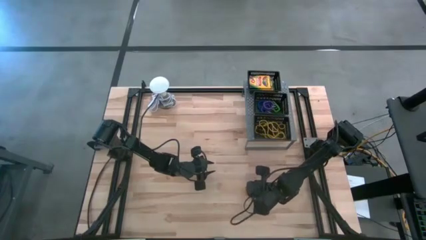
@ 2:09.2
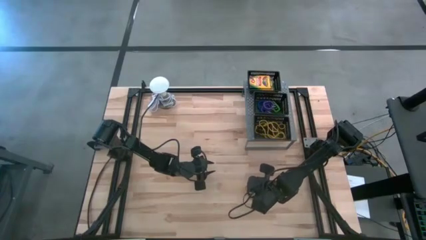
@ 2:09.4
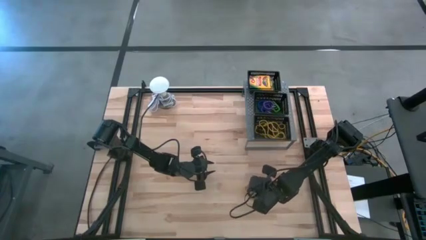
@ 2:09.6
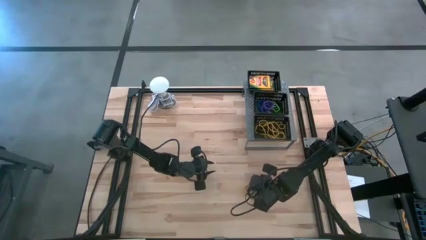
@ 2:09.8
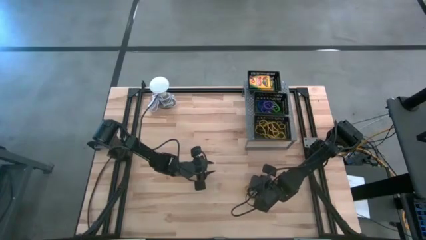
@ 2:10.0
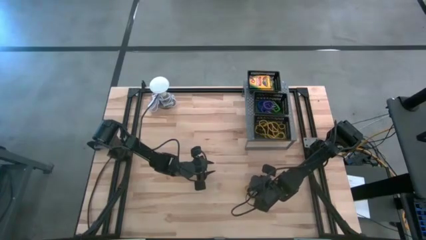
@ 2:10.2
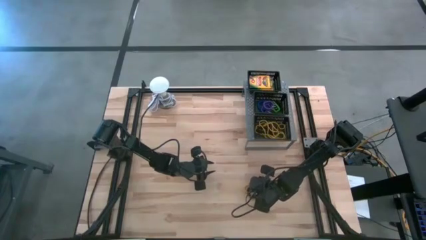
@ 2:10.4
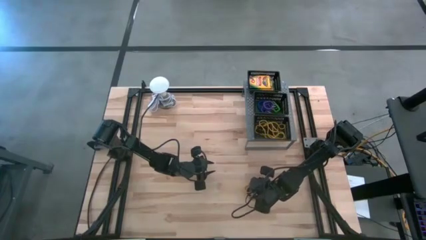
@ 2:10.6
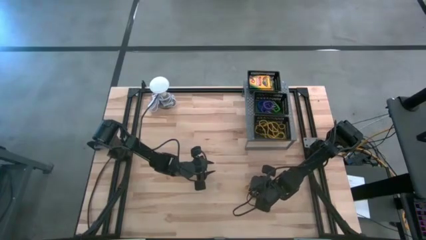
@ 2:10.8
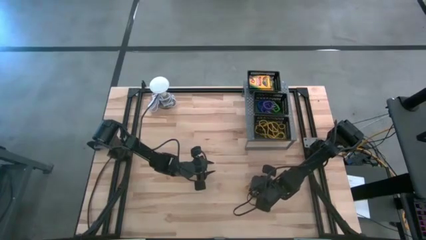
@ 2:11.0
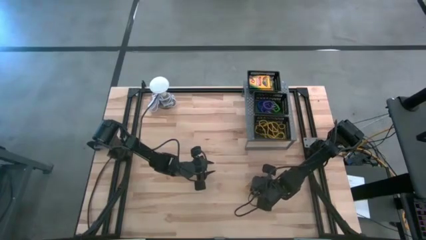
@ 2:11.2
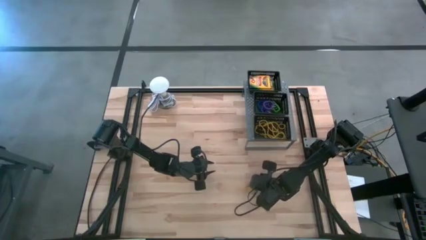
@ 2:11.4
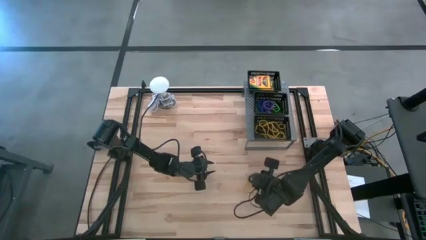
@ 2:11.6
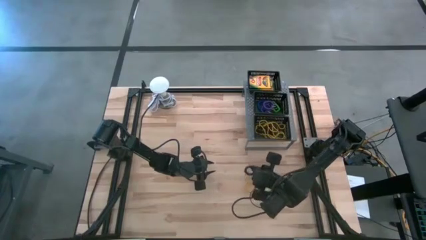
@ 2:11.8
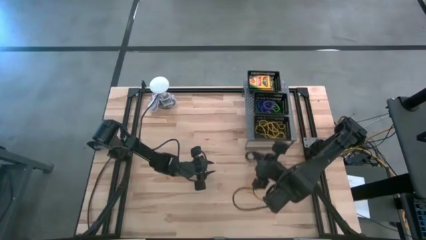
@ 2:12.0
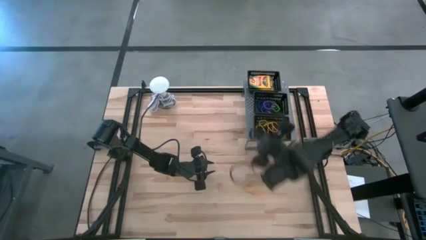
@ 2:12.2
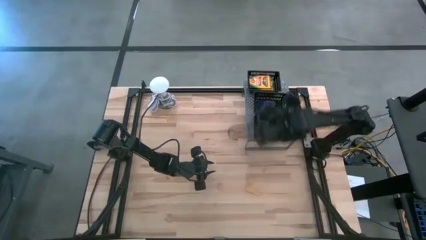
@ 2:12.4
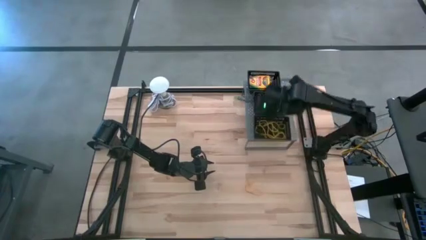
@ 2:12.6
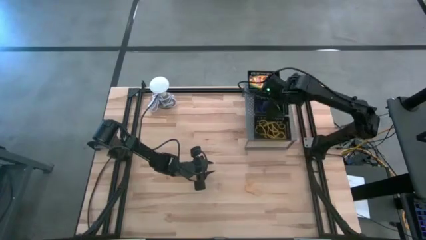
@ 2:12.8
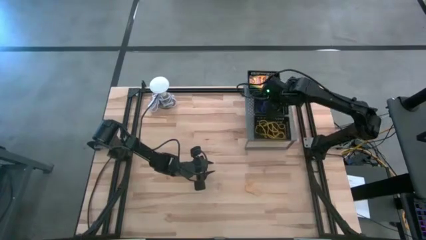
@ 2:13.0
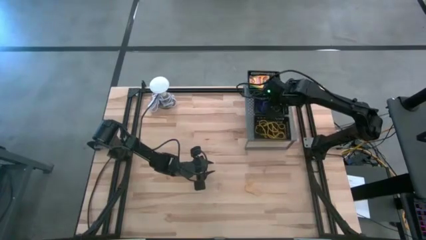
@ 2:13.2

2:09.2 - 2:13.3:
Task: Pick & Place Office Desk Supplies
Put the black spring keychain into the middle black bin on the shelf

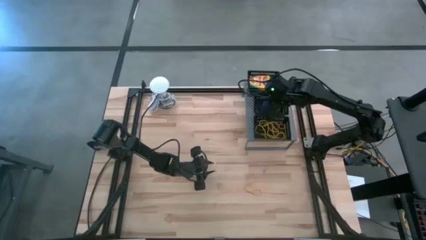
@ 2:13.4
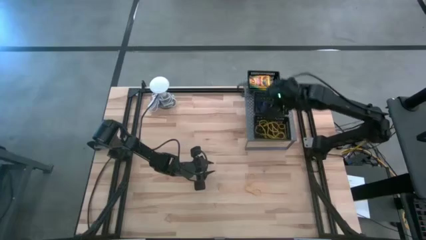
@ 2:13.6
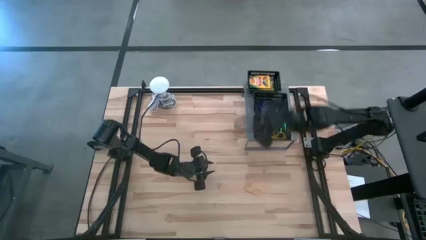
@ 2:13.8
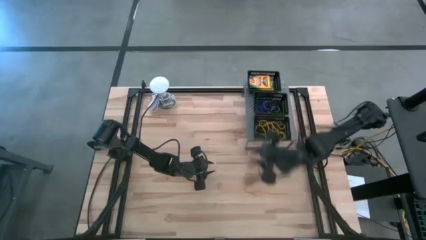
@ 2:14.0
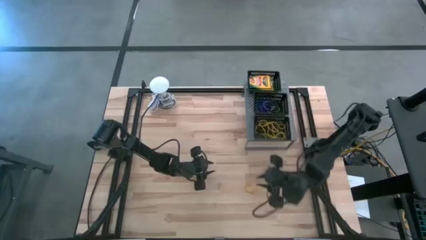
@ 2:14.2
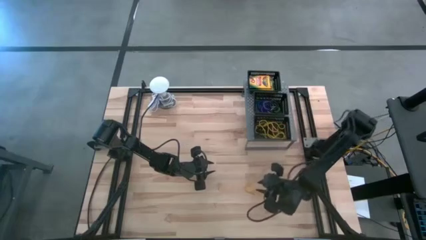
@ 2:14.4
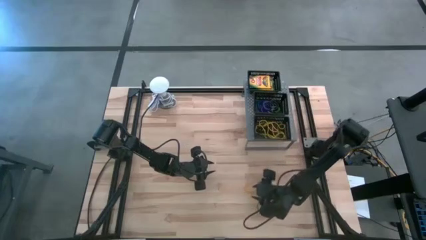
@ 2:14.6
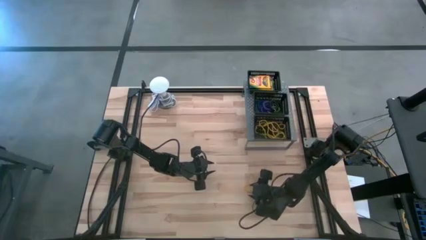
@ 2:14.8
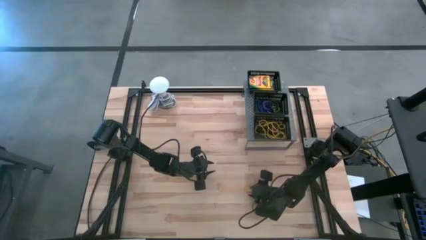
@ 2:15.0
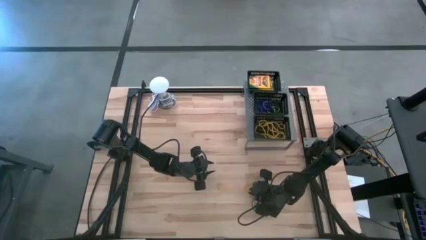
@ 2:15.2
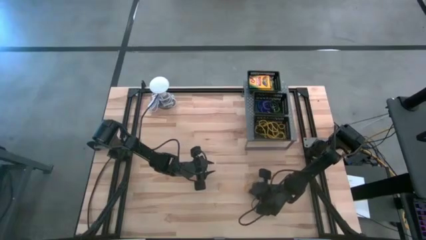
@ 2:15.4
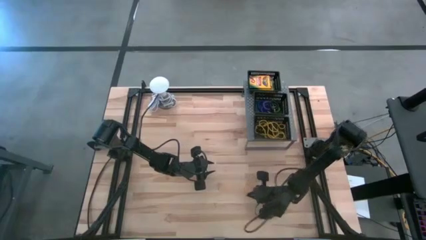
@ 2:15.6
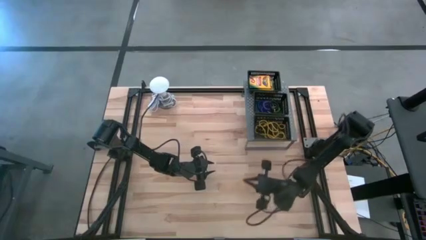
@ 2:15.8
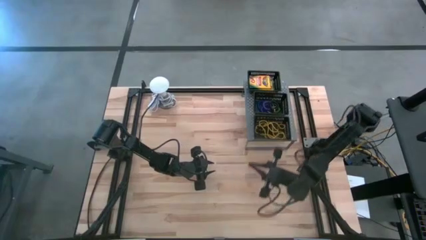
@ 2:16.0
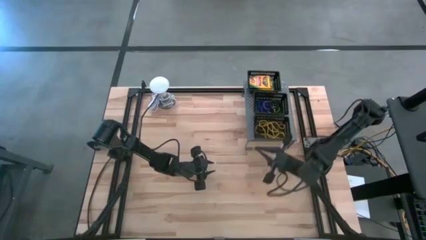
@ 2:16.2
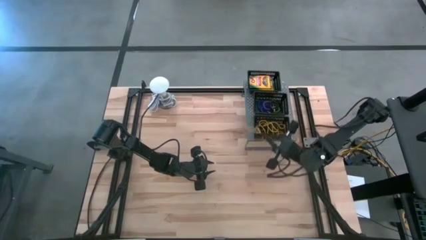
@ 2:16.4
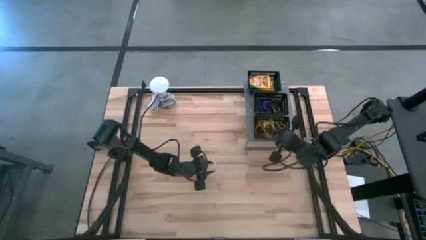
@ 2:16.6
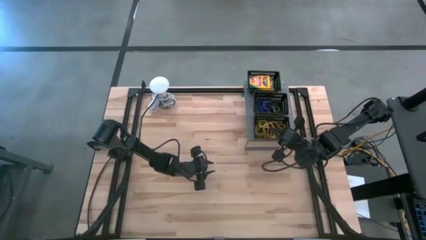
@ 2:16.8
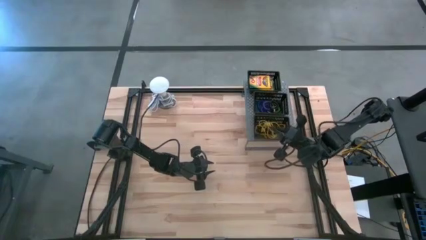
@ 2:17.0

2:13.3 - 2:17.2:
Put the yellow rubber band into the bottom black bin on the shelf

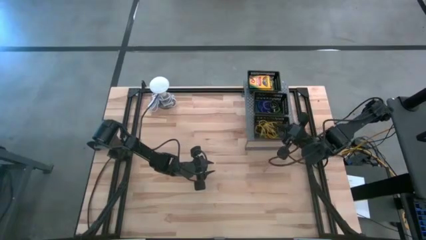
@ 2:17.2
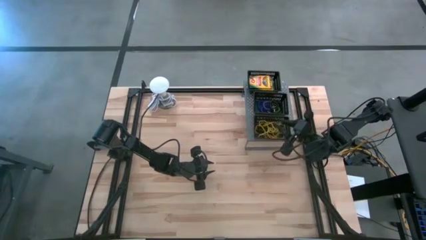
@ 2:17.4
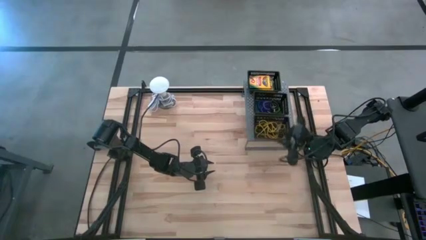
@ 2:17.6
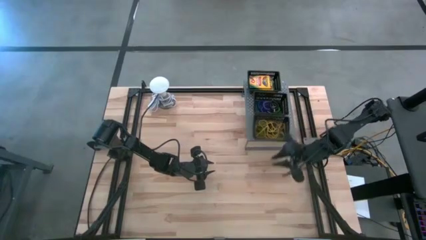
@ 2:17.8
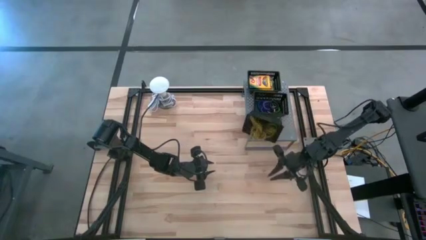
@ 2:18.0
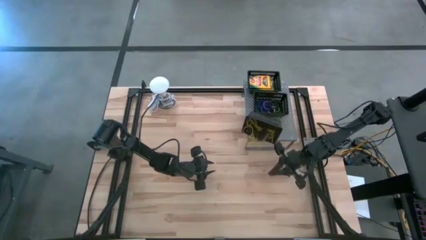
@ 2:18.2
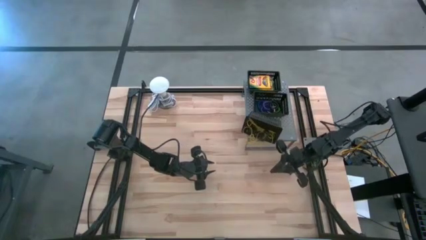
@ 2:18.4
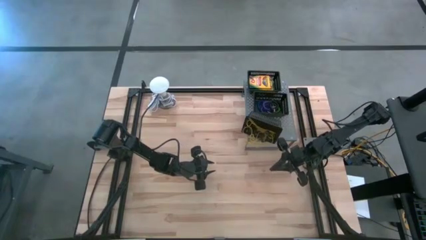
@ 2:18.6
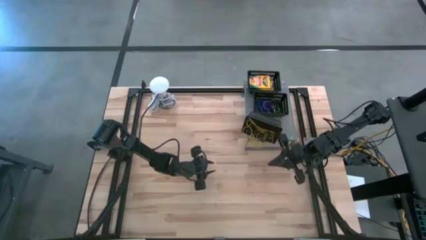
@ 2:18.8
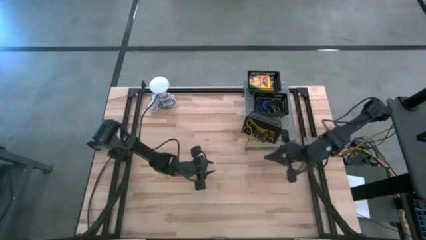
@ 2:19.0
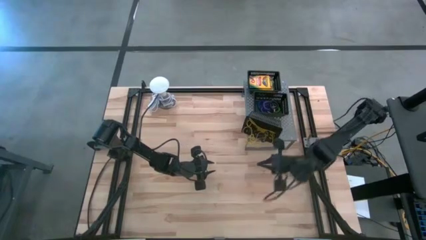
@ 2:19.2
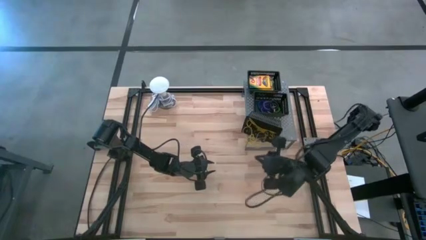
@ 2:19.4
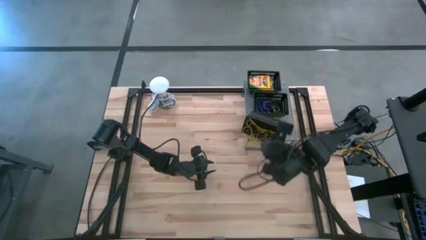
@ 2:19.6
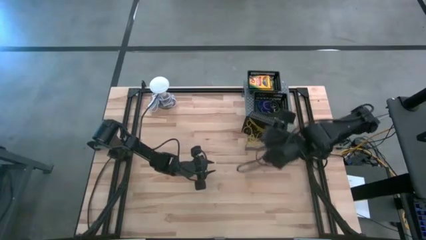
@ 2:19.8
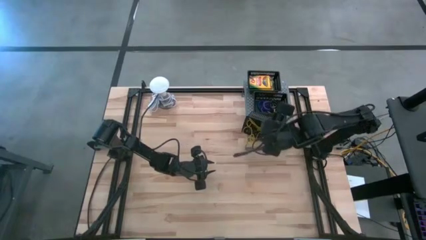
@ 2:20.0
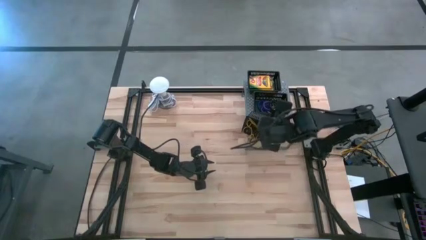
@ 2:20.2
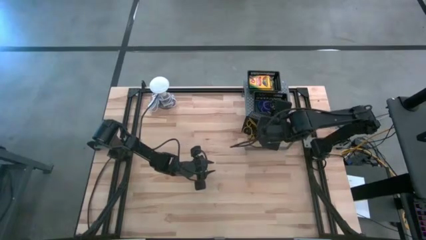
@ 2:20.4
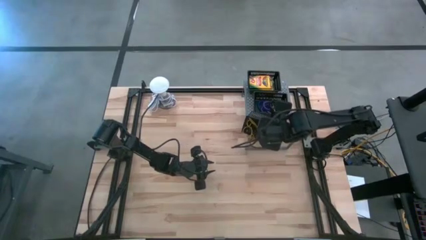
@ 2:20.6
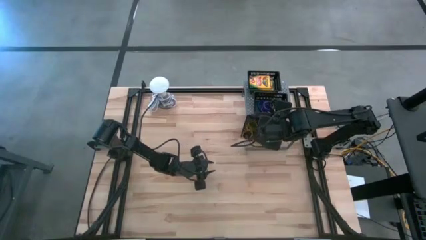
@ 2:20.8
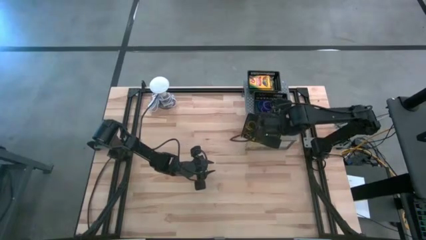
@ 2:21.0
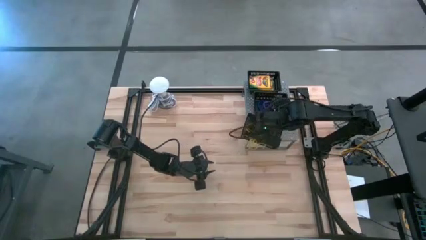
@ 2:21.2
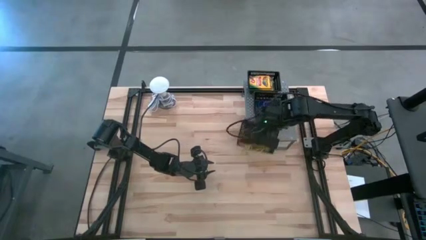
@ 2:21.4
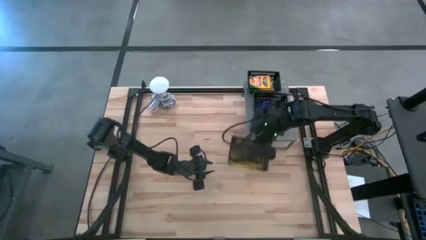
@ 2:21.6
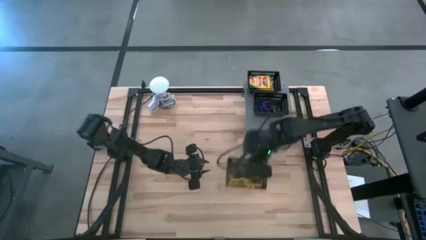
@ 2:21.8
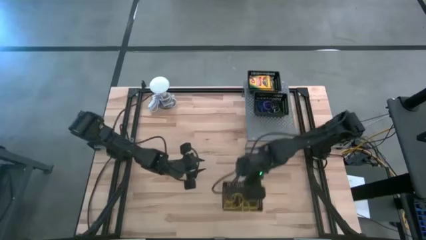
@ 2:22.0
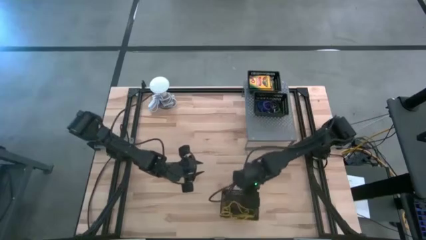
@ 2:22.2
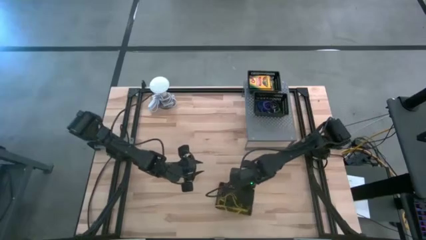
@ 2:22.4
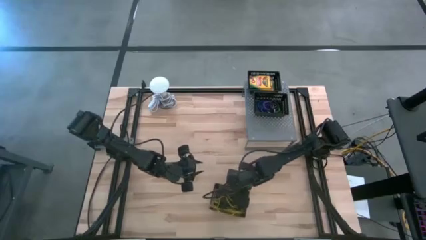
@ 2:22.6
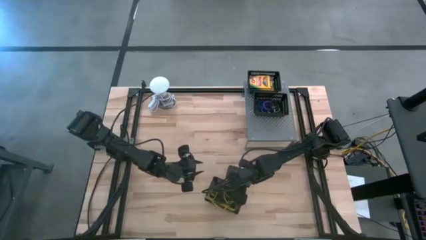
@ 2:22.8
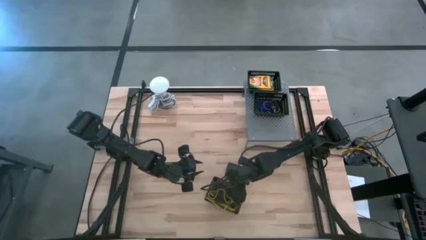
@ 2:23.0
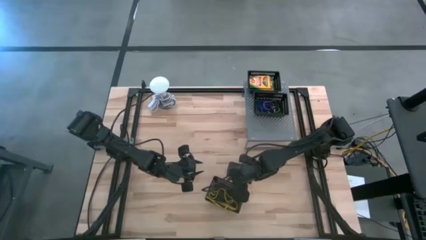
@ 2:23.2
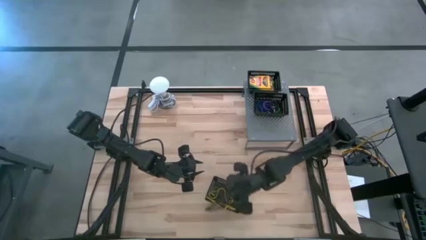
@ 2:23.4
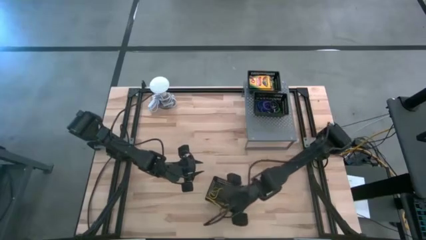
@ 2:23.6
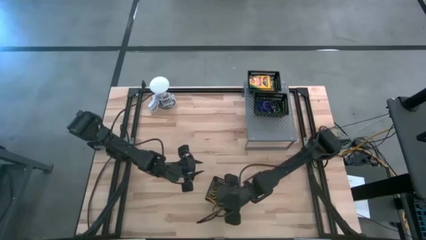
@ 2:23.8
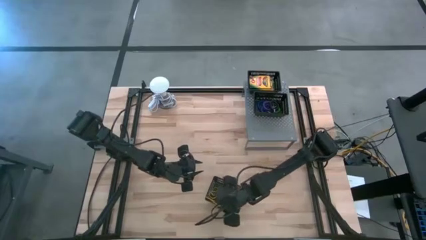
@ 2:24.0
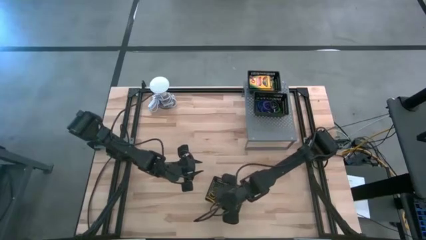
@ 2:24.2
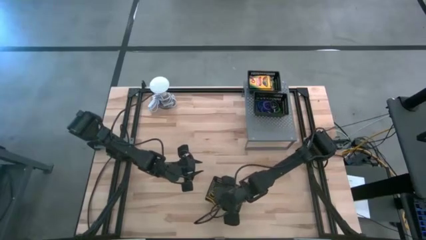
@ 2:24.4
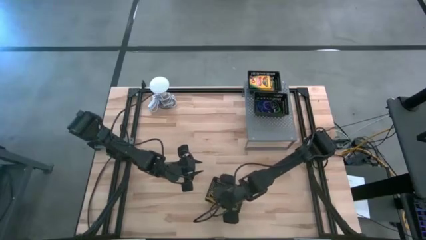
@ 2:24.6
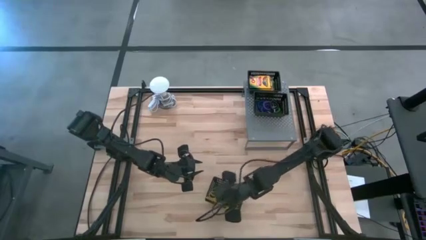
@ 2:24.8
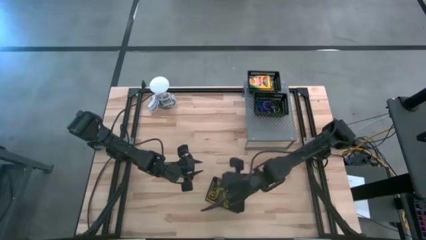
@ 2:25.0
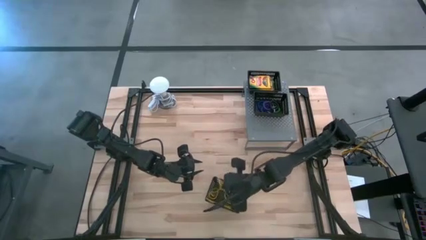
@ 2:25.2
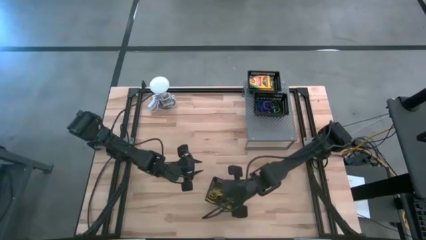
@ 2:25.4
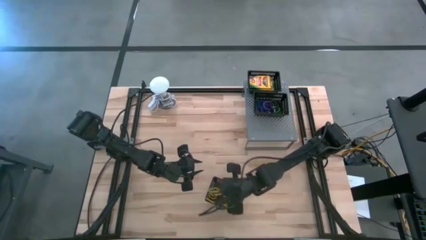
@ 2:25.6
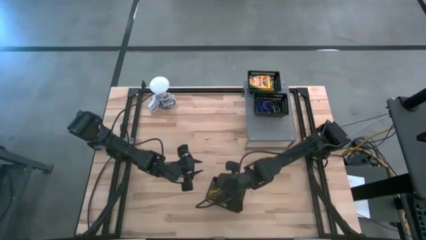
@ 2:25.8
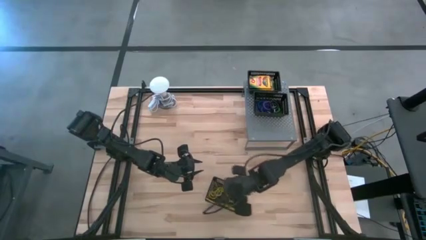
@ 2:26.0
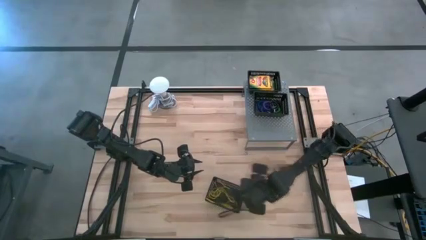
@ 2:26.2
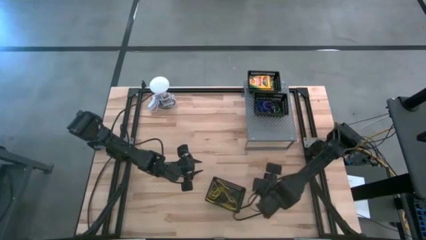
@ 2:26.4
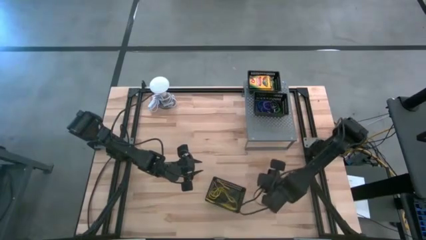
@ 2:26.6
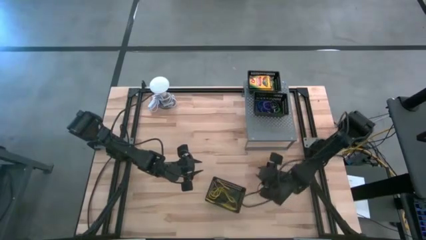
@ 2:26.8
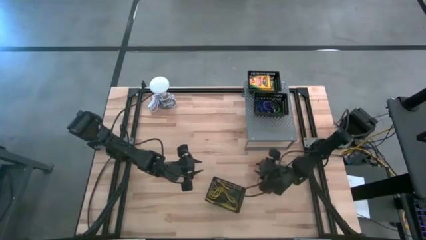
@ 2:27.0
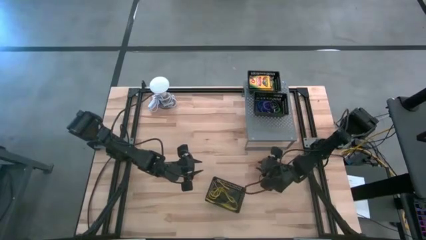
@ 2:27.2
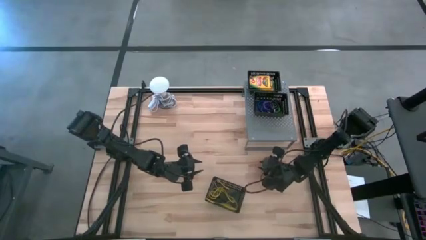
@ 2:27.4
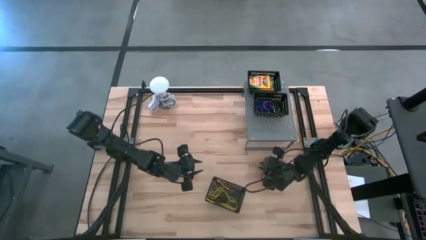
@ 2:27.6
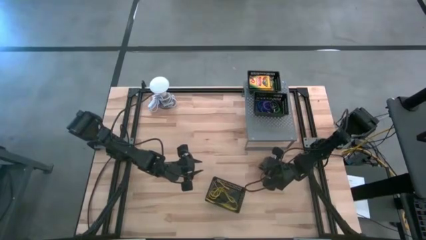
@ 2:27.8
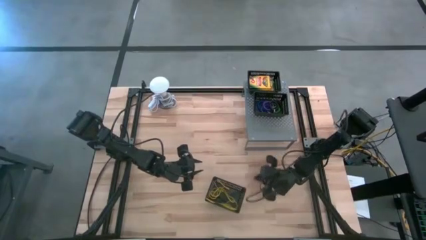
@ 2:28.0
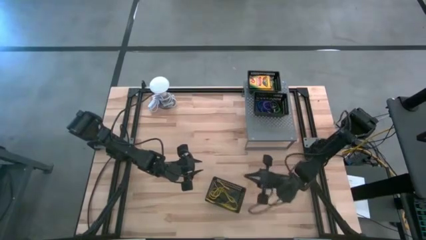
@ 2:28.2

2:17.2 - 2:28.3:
Adjust the black bin on the shelf
